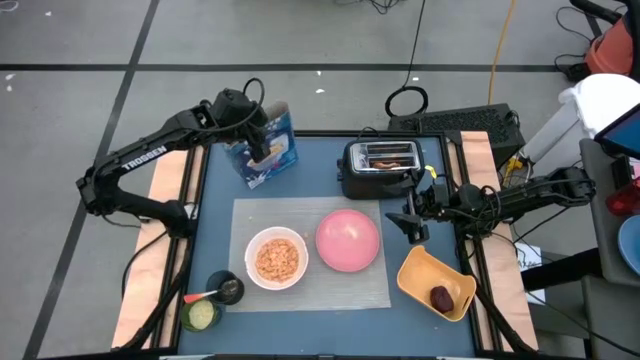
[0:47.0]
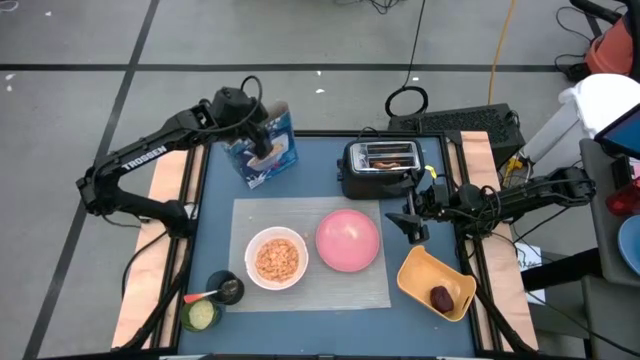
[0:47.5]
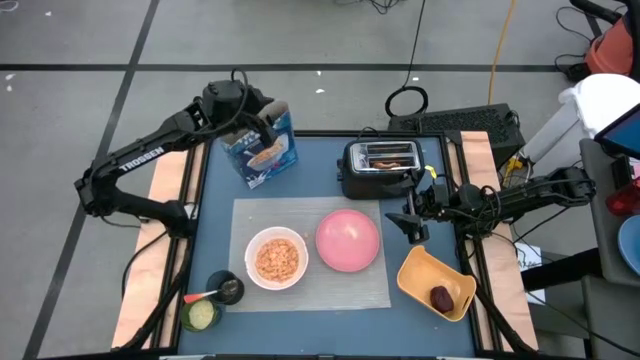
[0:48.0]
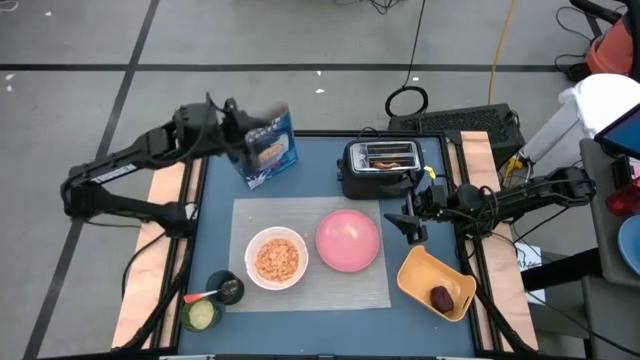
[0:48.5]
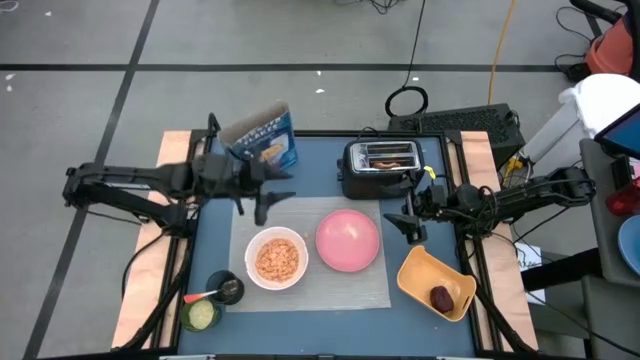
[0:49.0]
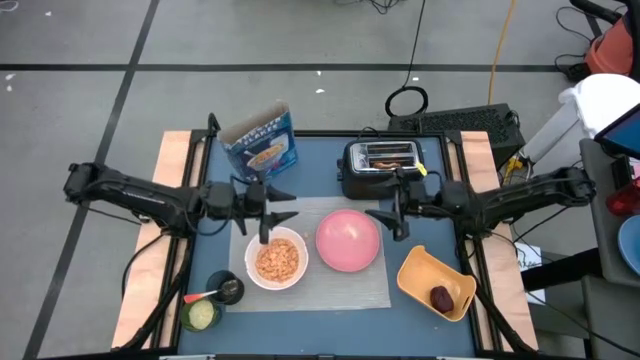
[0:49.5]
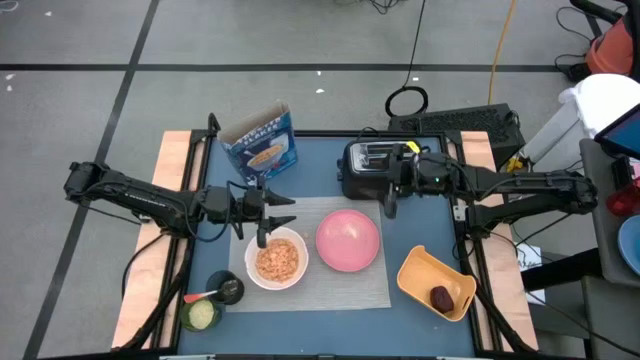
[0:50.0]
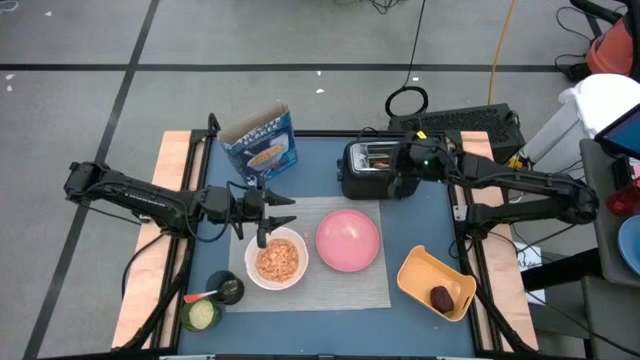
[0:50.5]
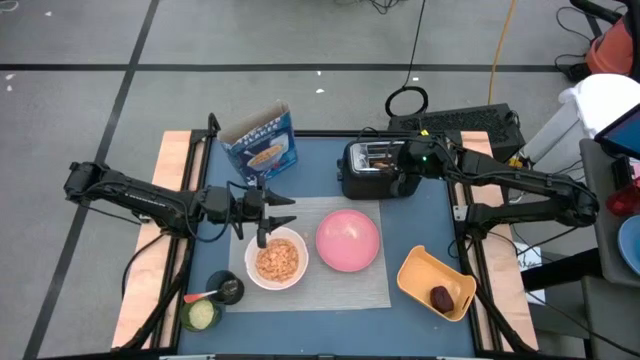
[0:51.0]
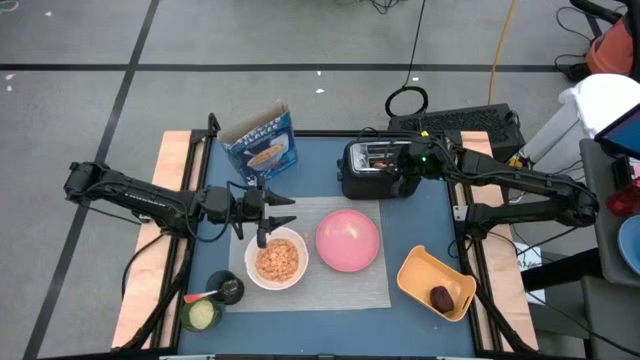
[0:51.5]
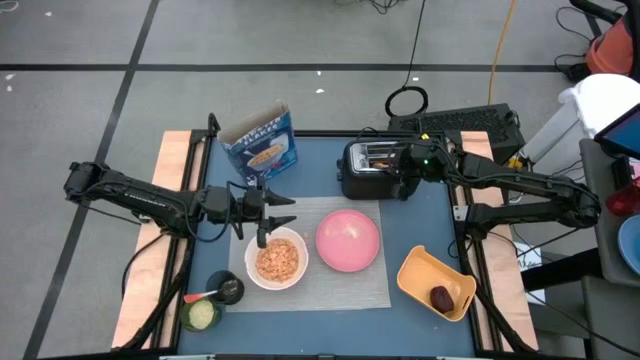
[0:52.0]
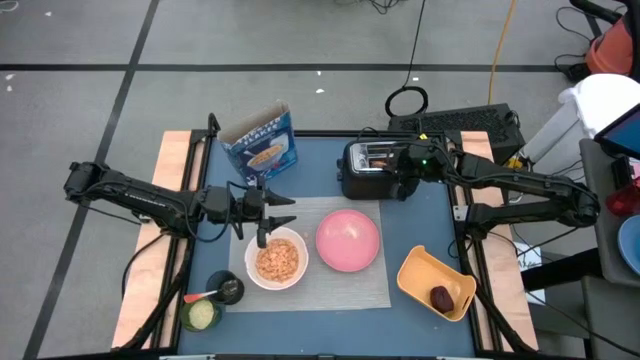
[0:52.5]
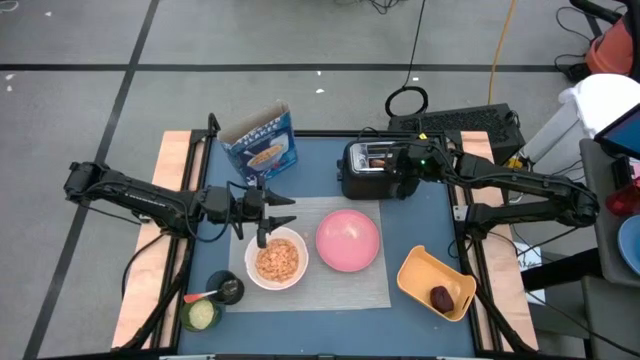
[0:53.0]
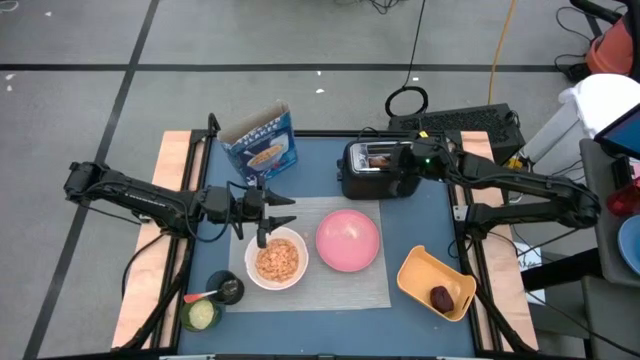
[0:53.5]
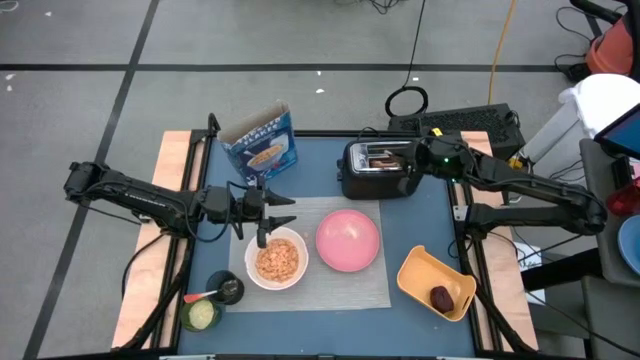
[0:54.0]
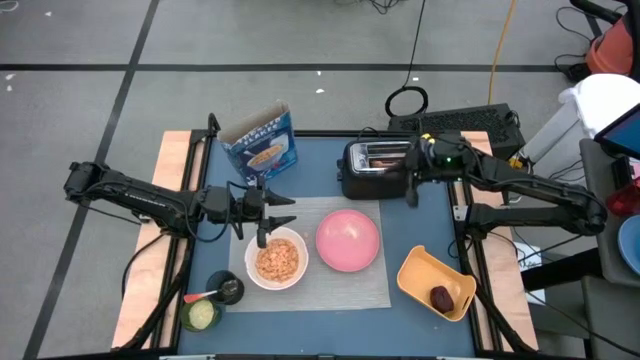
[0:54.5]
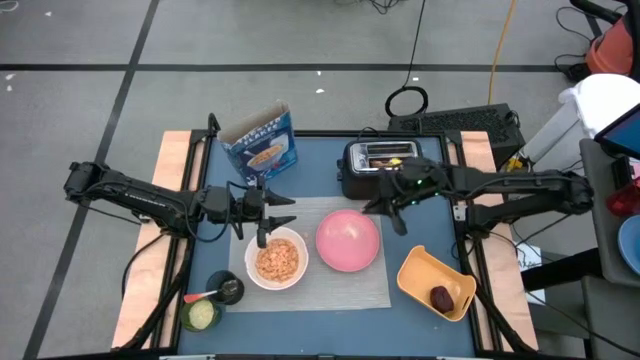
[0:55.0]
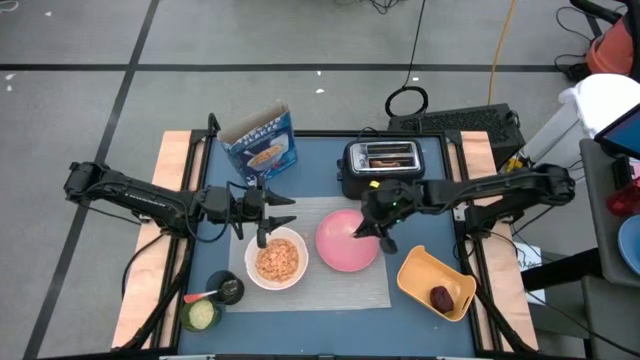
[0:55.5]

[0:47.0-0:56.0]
Task: Arrange a breakfast setting
Put the toasted bread on the pink plate

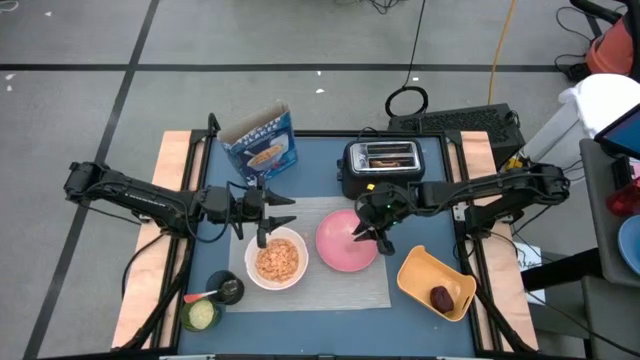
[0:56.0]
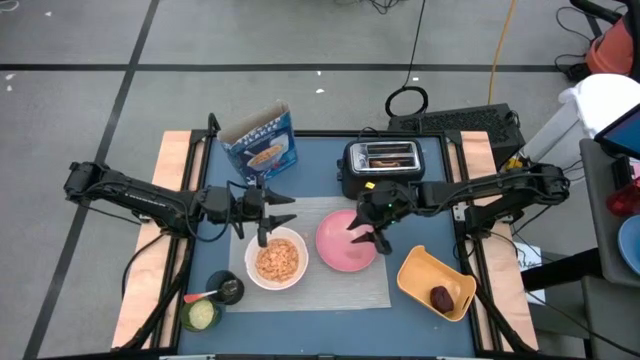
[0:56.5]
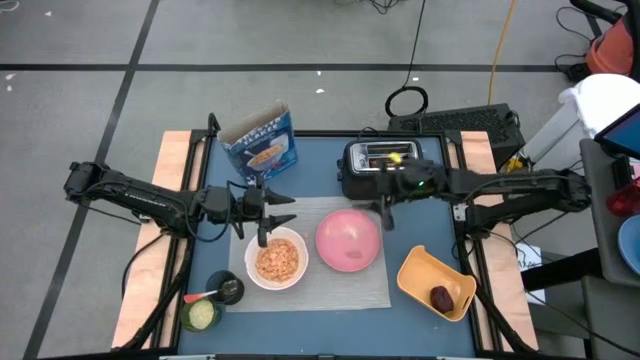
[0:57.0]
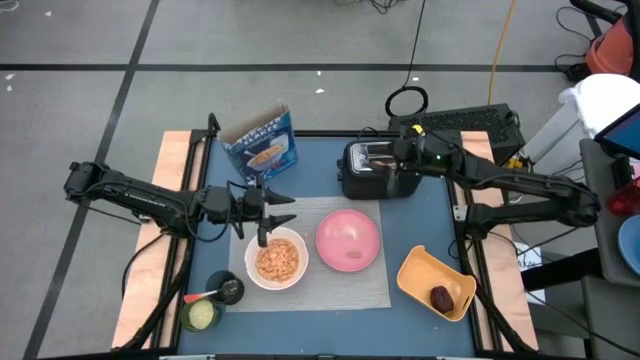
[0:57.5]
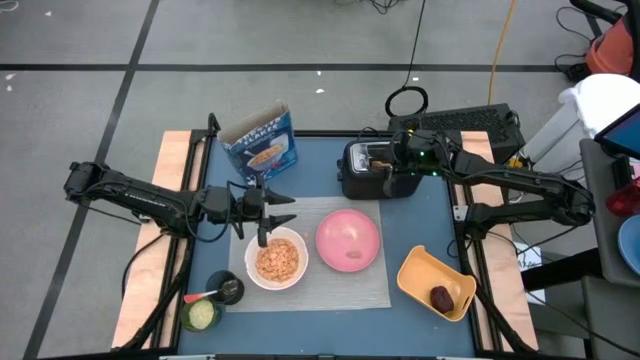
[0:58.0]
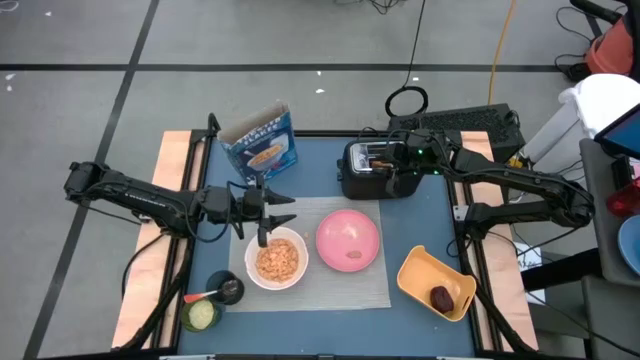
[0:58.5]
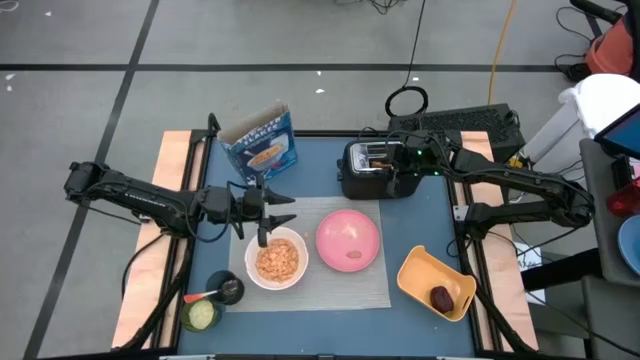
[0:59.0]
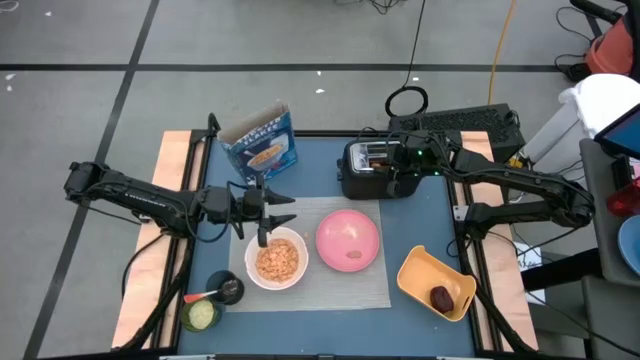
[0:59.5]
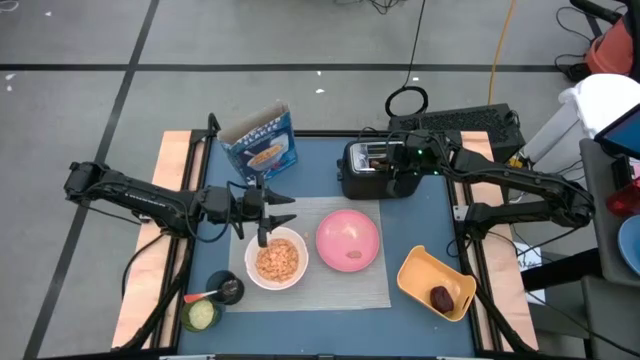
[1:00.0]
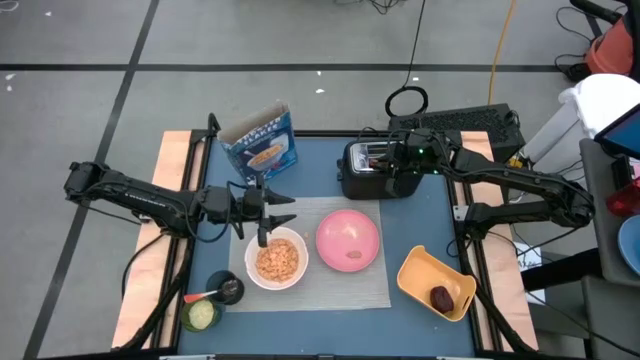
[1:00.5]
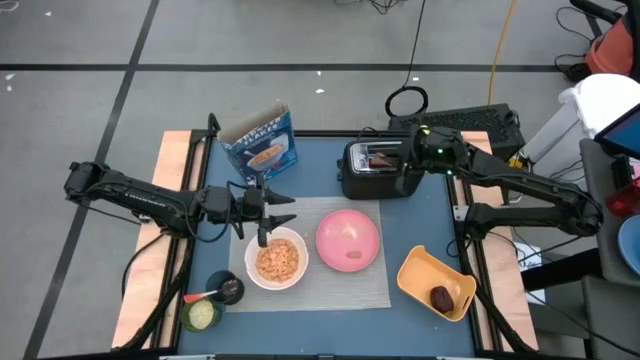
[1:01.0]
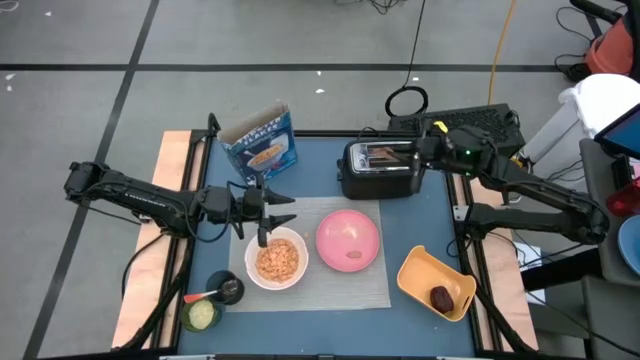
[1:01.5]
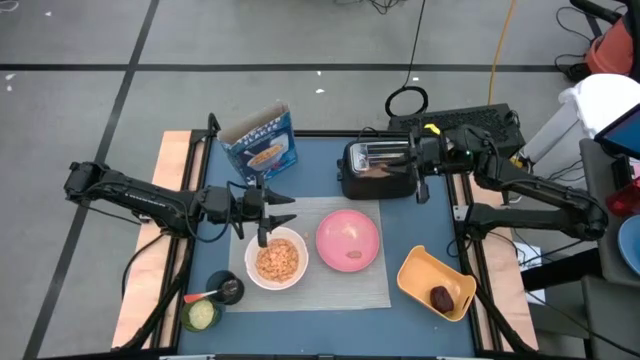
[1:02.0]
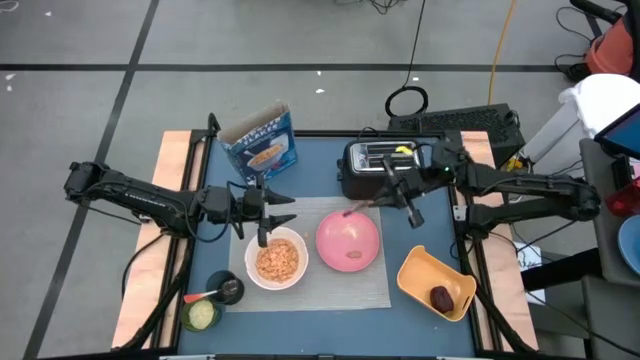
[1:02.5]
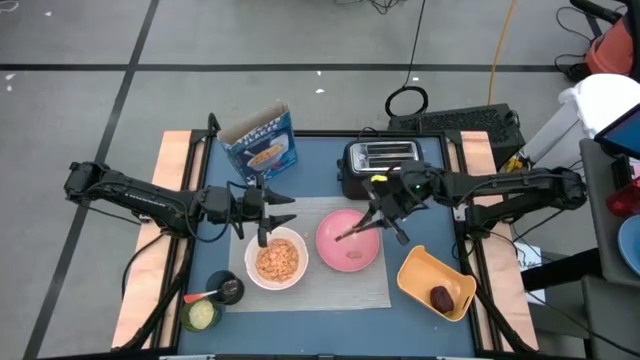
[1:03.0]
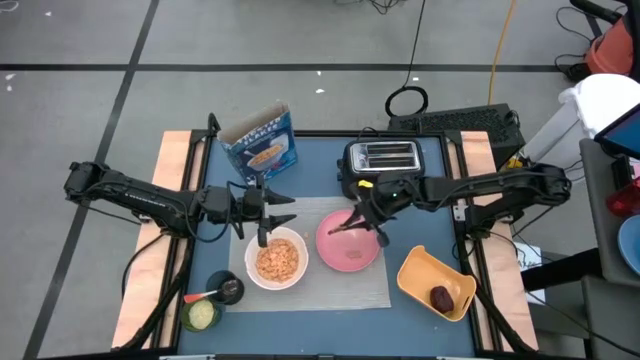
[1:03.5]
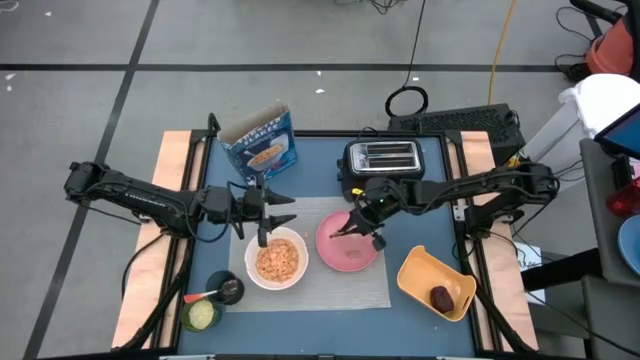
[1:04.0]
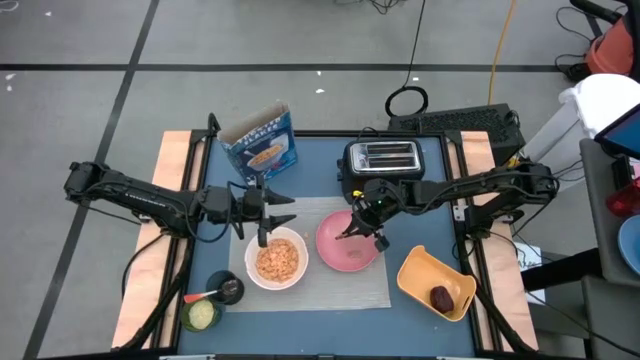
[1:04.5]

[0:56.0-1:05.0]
Put the toasted bread on the pink plate

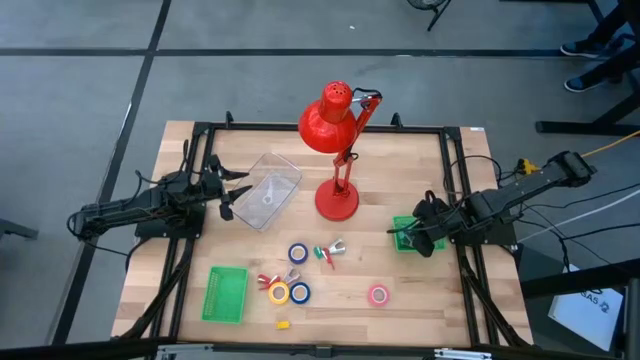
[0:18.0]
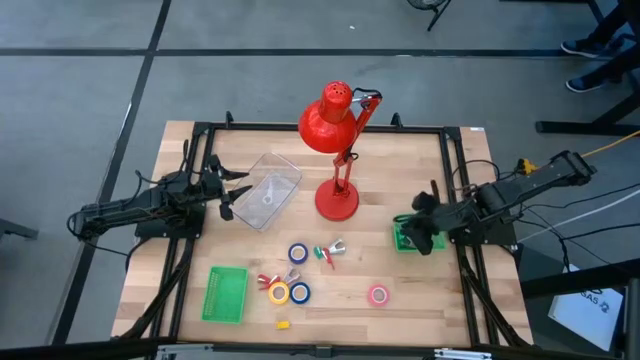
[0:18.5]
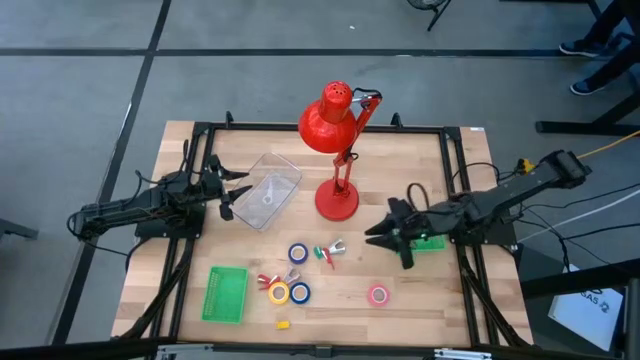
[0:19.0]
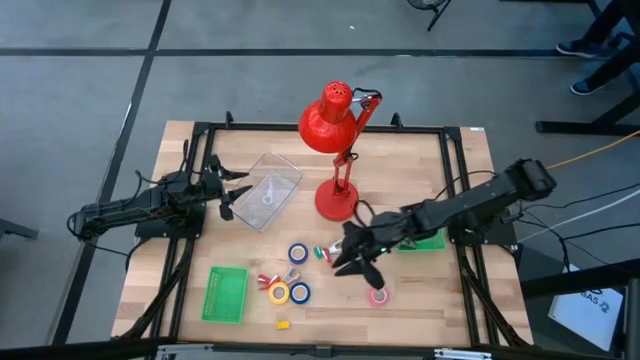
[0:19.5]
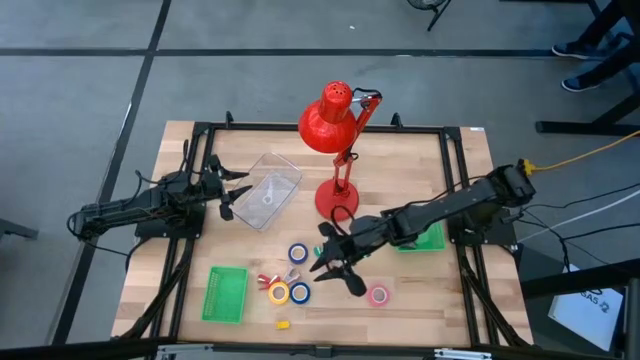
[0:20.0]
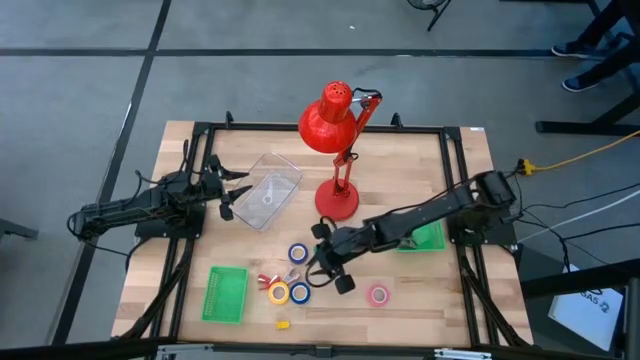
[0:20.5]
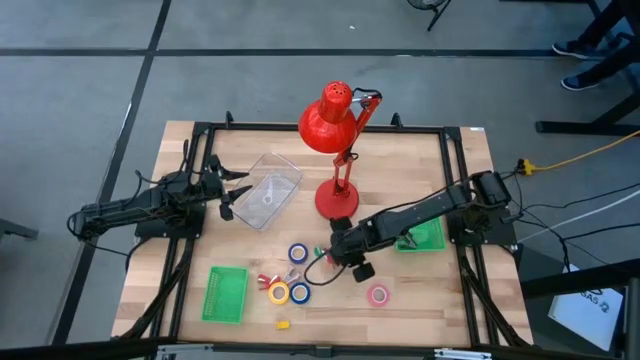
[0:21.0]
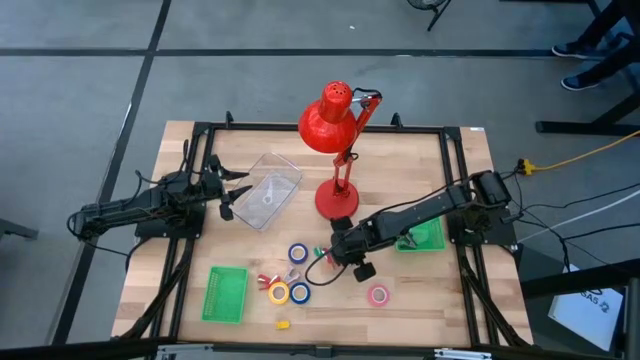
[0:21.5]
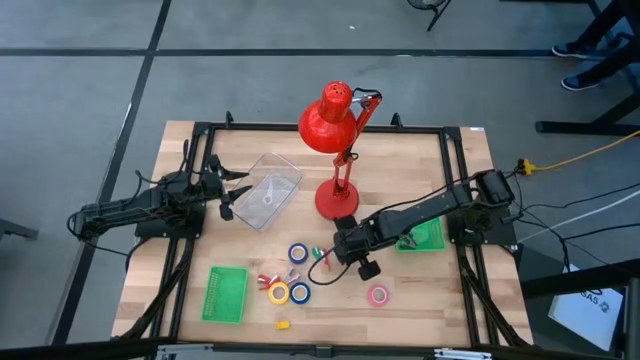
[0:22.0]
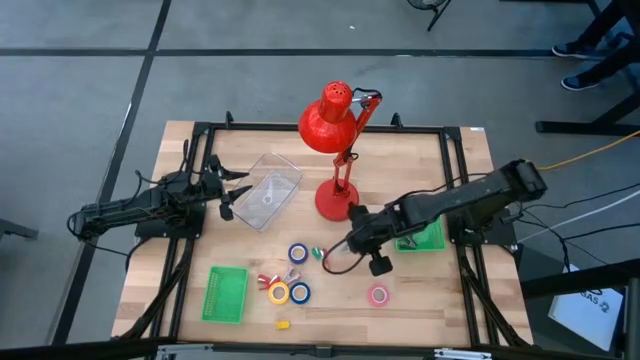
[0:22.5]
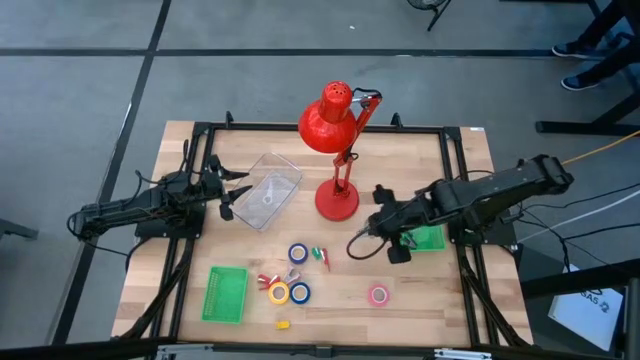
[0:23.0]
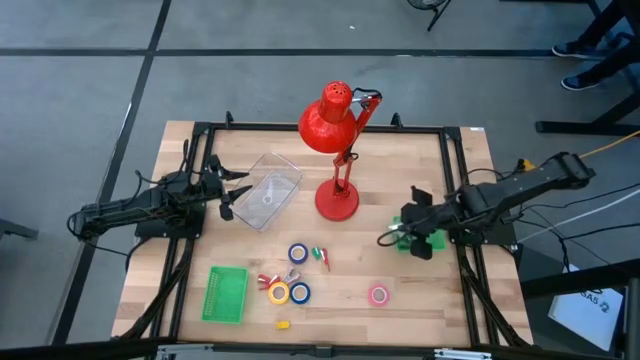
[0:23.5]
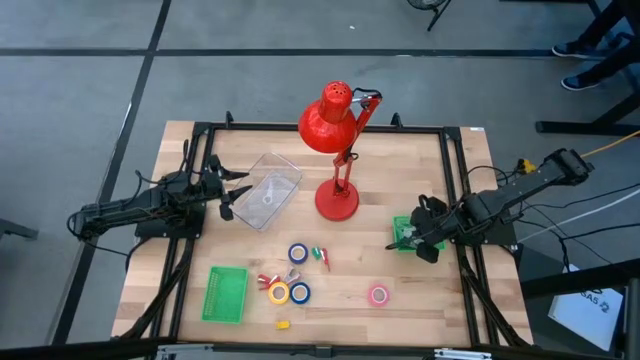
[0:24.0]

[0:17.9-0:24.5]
Task: Pick and place Stapler, Stapler remover, tape
Put the gray staple remover into the top green basket
